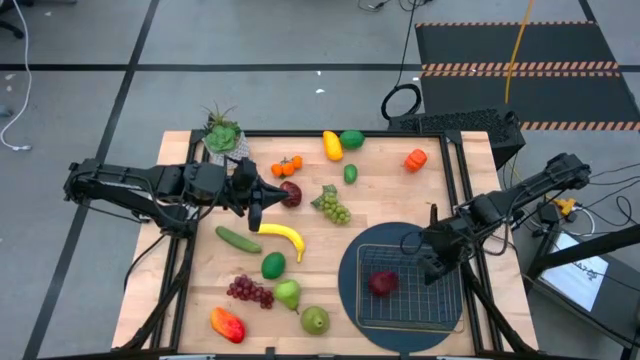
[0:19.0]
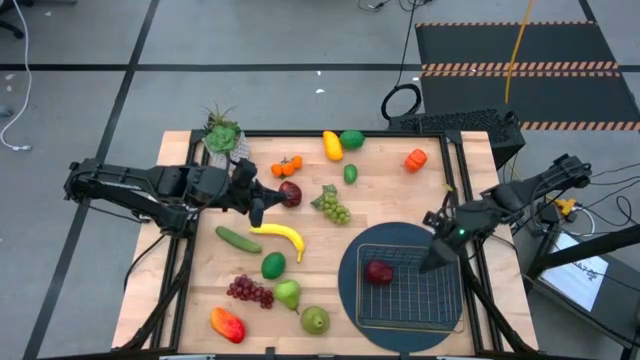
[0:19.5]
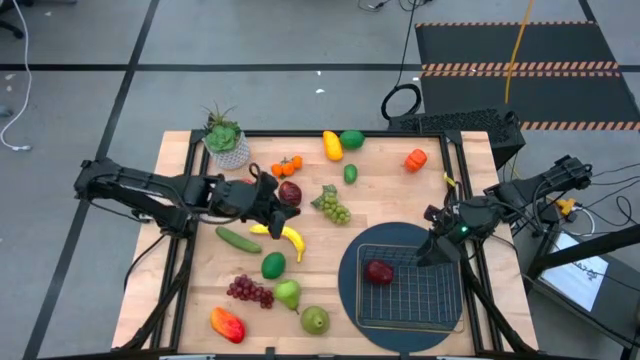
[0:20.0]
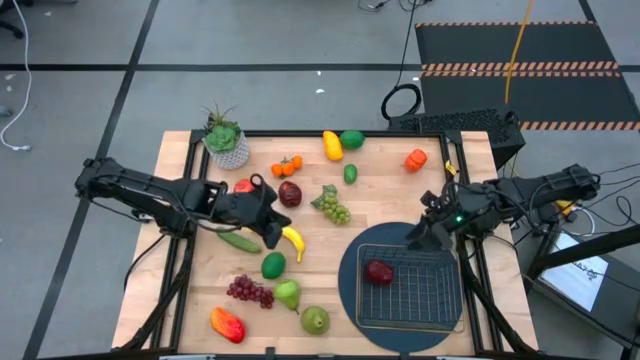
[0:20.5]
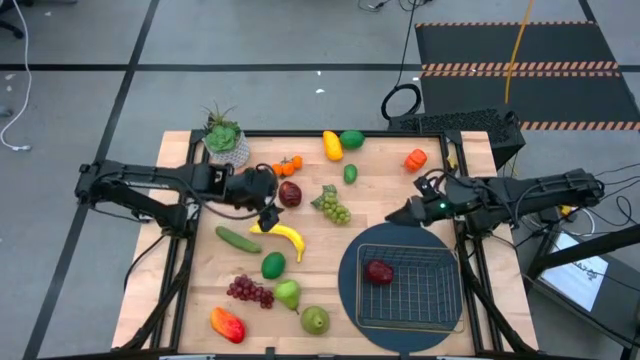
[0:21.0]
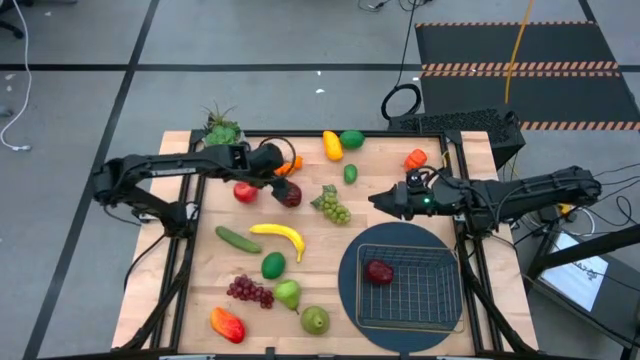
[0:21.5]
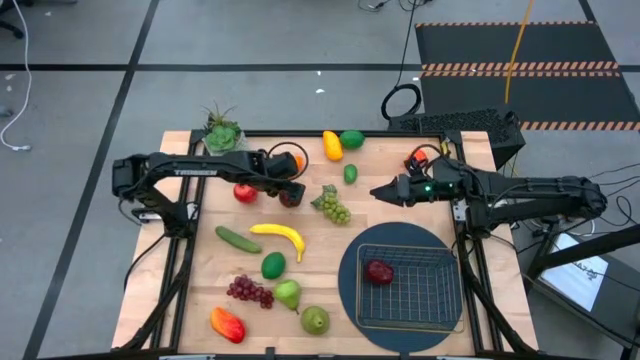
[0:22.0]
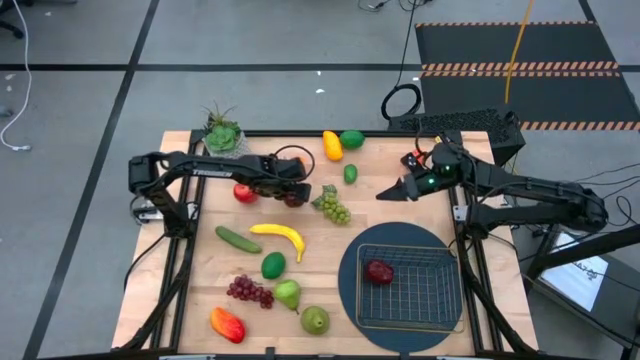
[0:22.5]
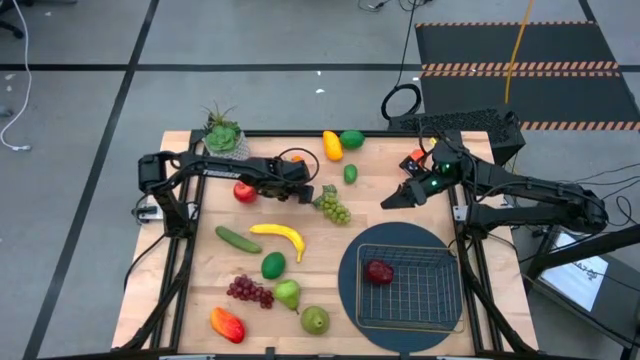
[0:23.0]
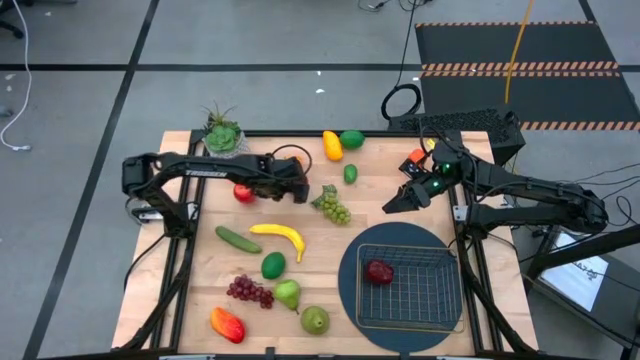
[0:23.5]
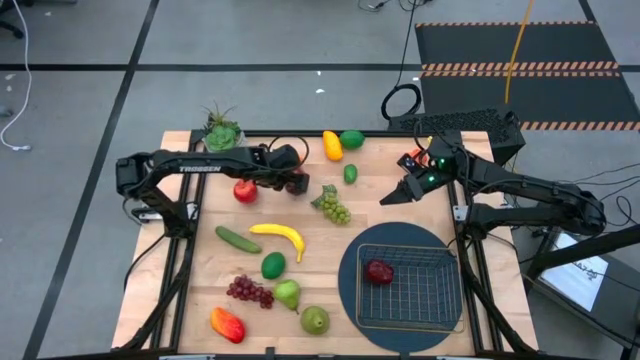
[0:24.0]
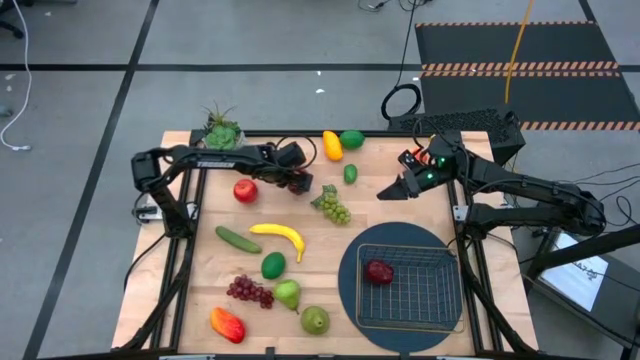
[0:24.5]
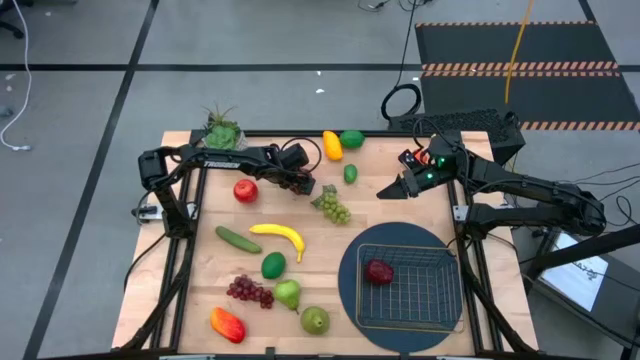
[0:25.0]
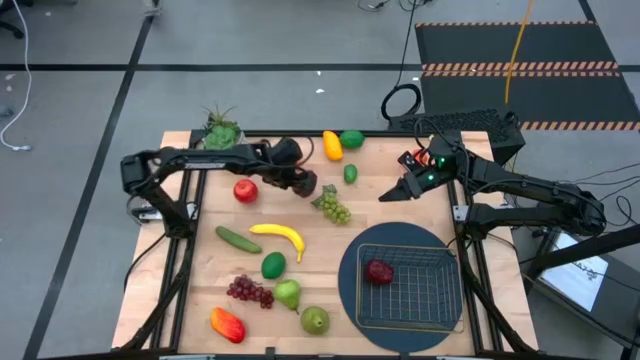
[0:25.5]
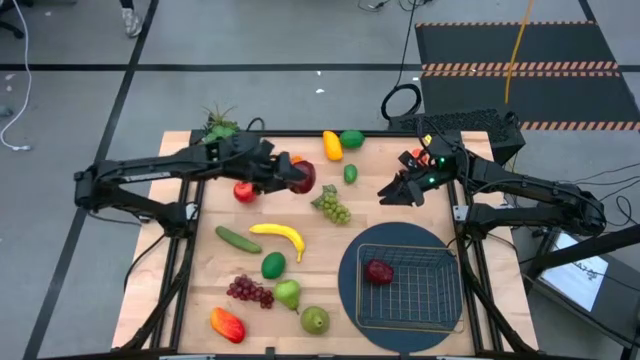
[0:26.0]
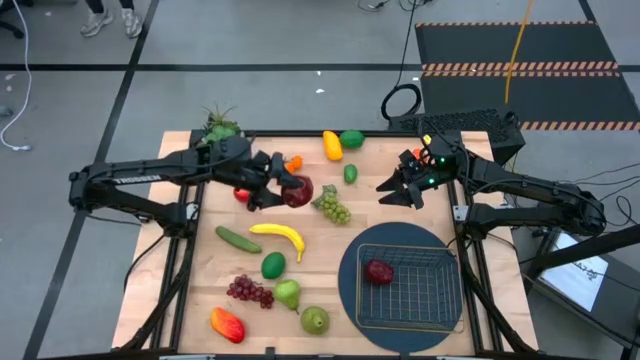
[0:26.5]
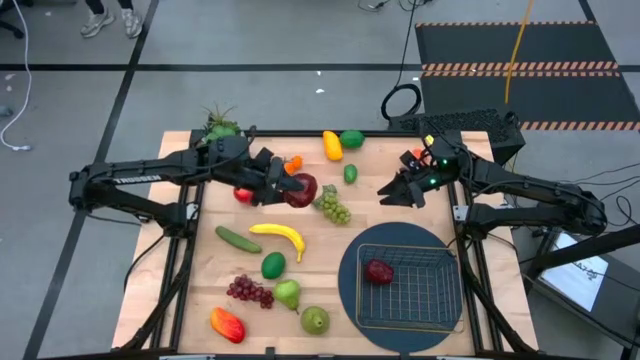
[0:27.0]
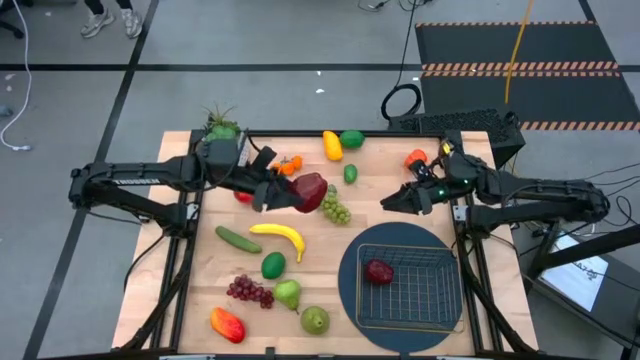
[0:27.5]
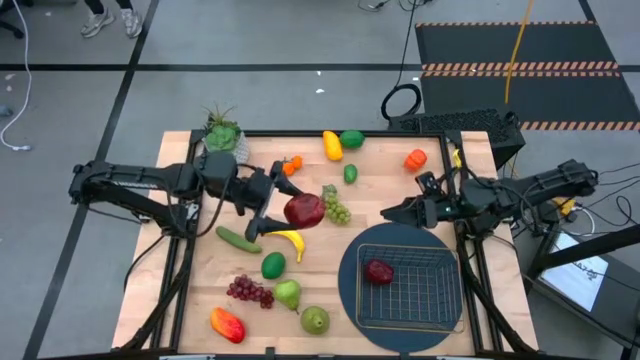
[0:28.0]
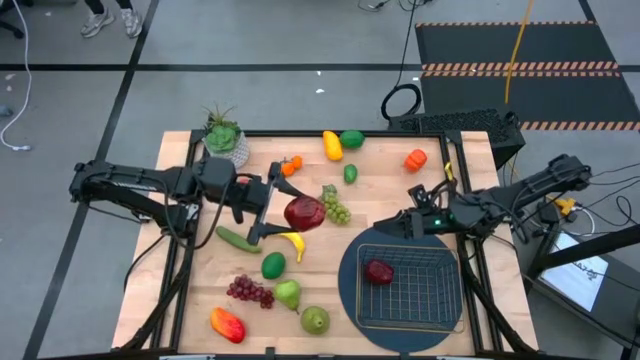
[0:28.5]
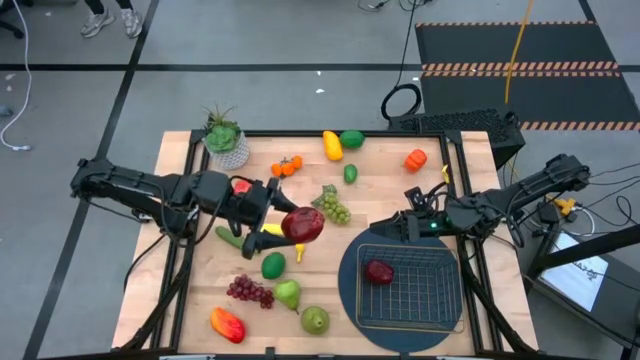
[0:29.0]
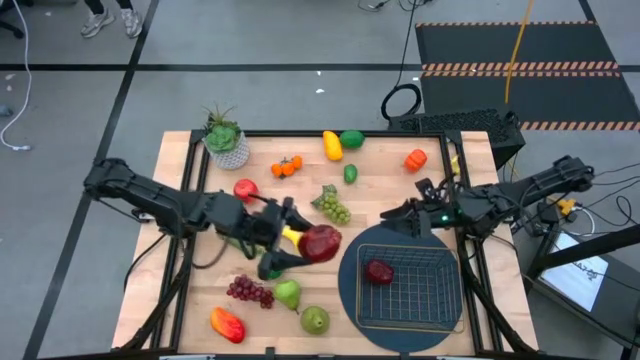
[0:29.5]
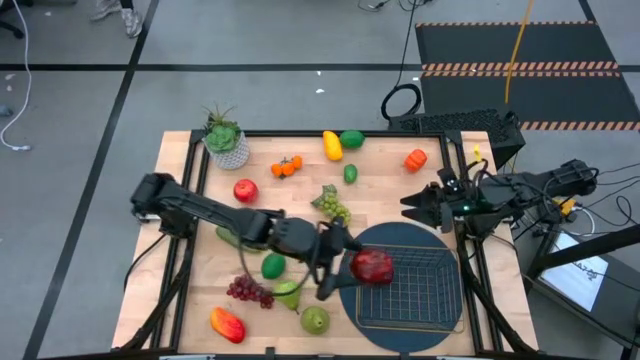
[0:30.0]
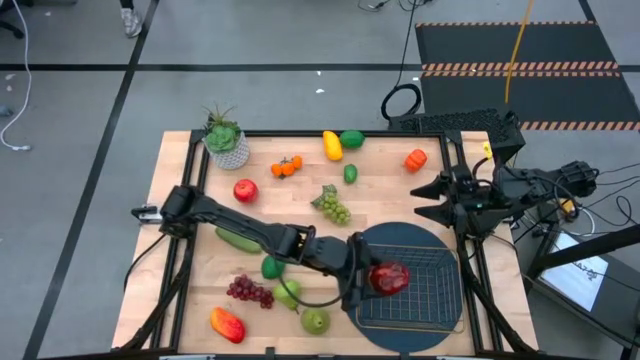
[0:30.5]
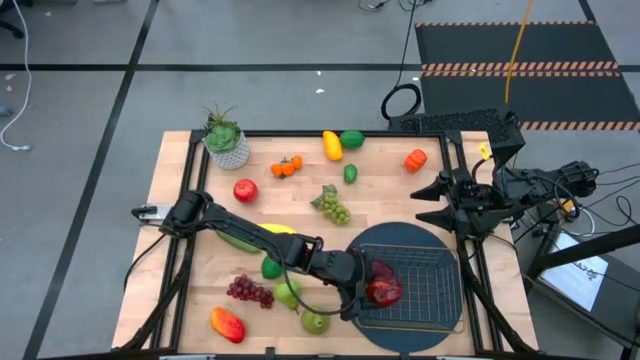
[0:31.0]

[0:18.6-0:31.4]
Task: Build produce basket
Put the right apple into the gold wire basket

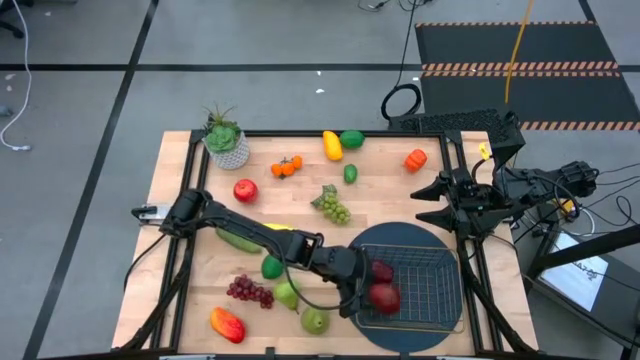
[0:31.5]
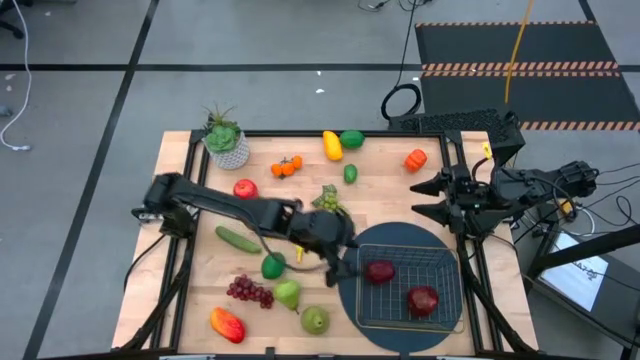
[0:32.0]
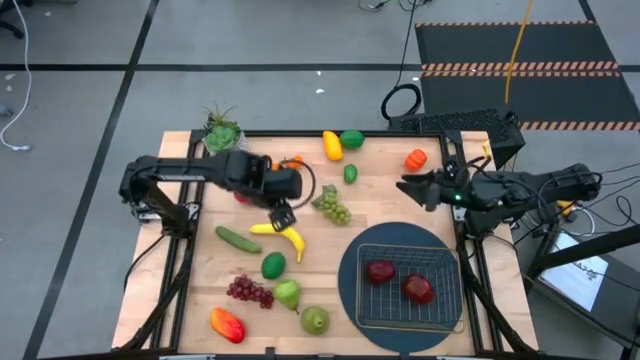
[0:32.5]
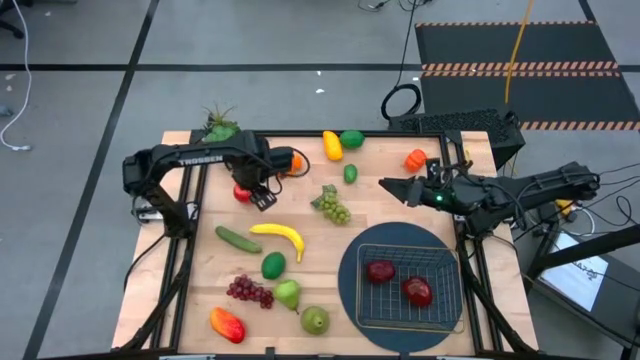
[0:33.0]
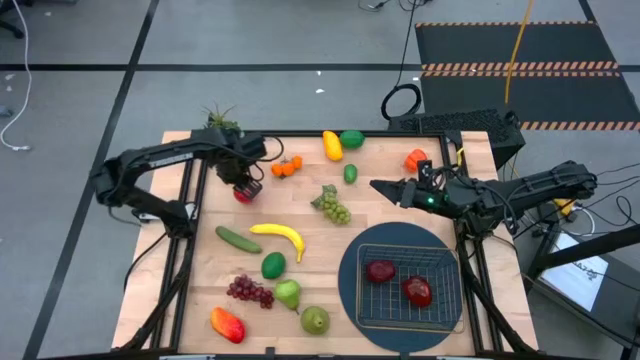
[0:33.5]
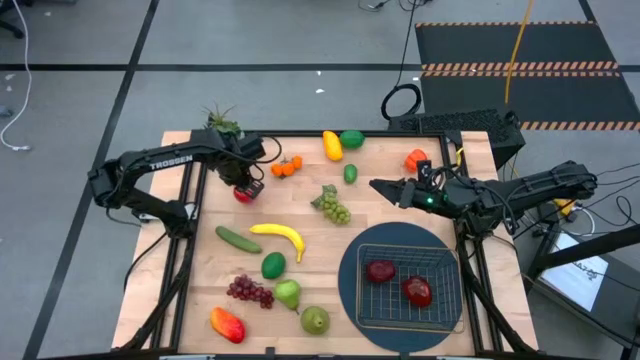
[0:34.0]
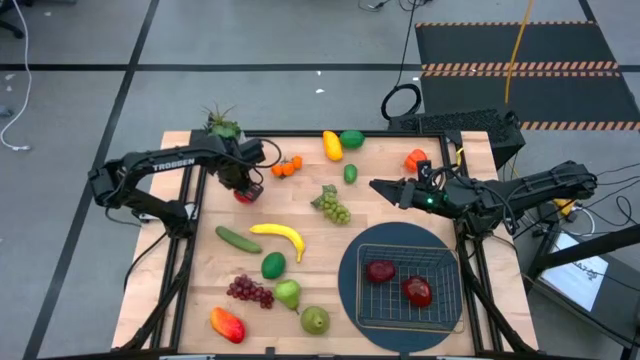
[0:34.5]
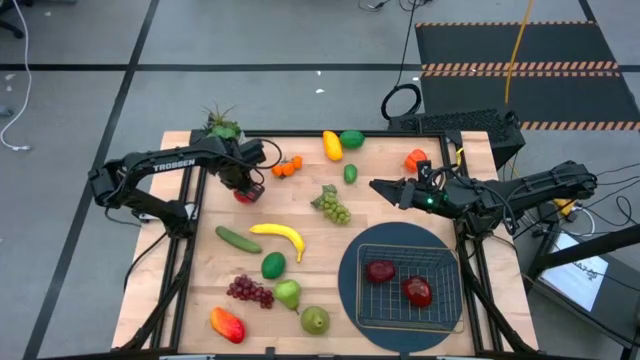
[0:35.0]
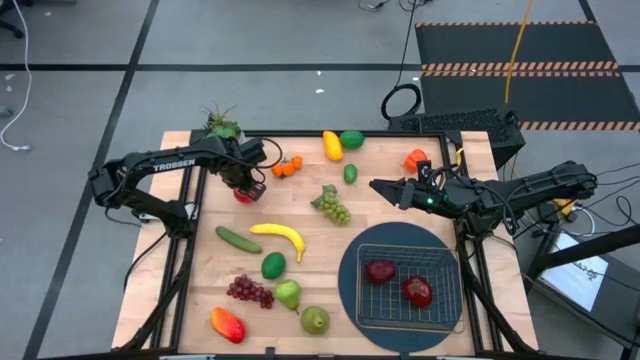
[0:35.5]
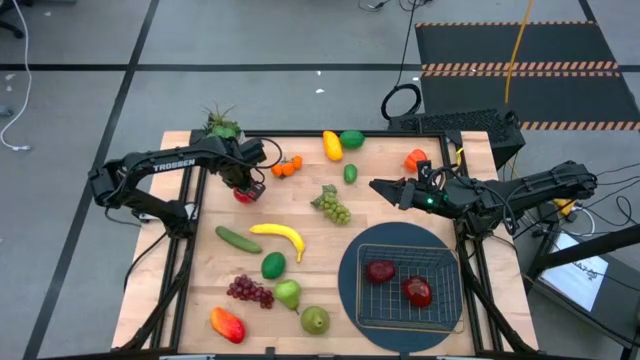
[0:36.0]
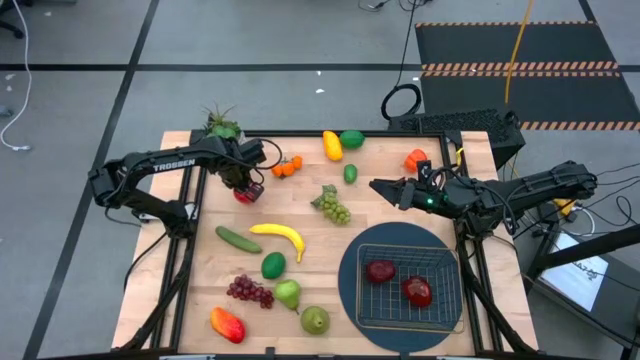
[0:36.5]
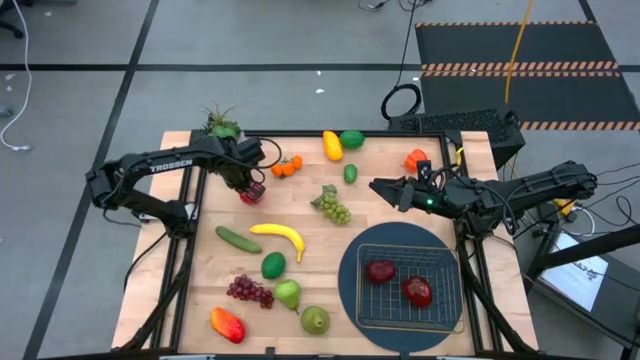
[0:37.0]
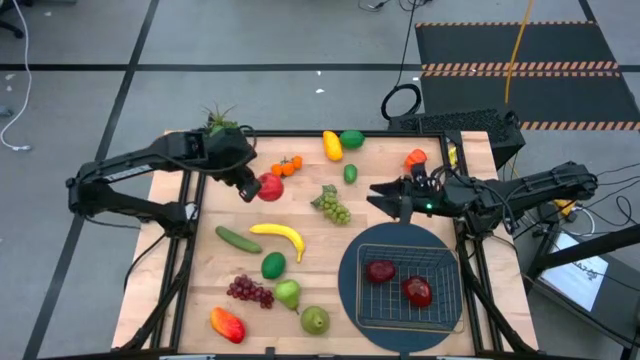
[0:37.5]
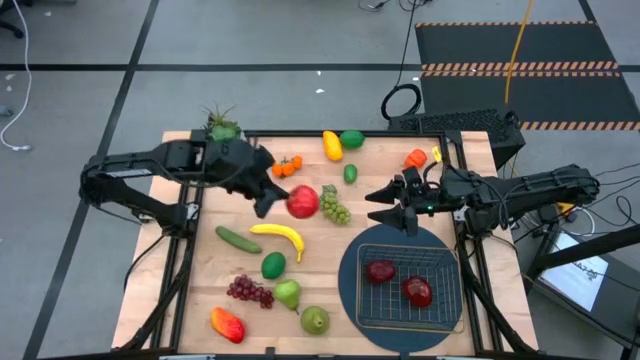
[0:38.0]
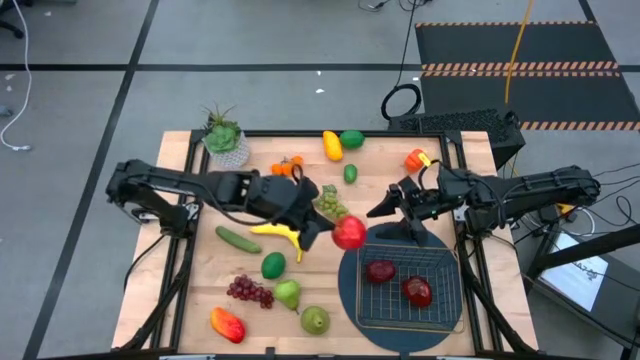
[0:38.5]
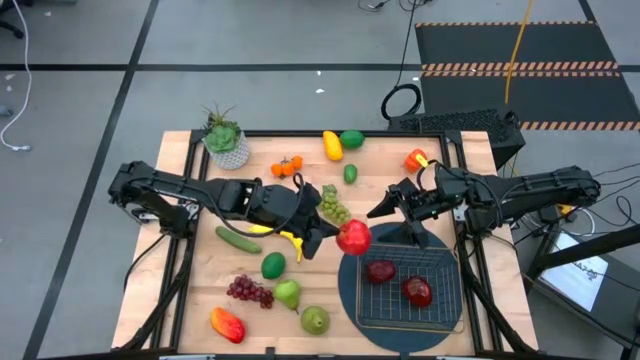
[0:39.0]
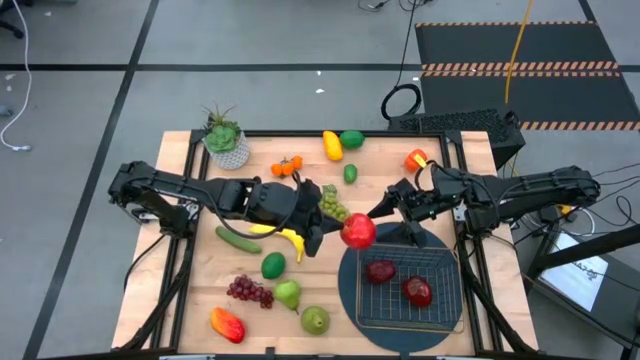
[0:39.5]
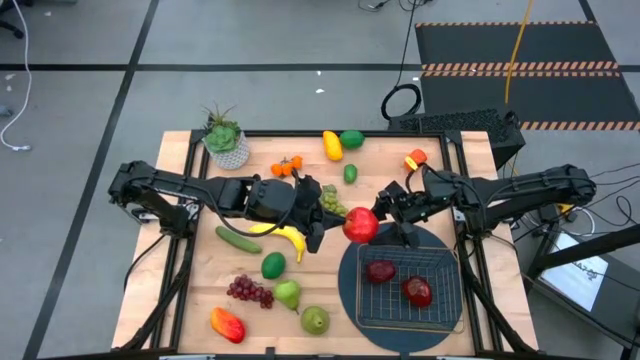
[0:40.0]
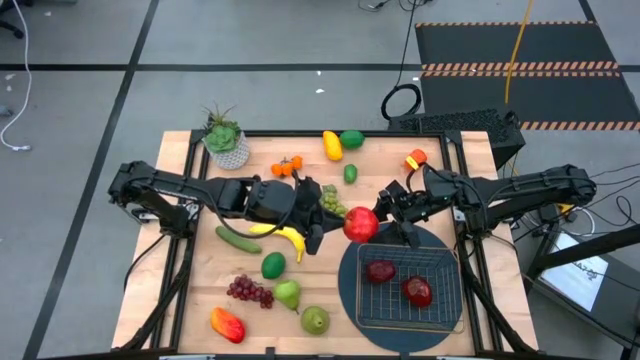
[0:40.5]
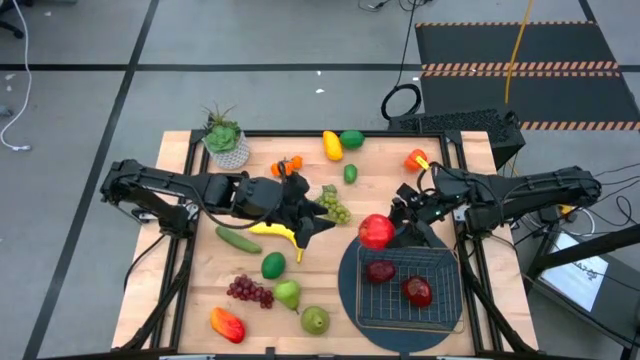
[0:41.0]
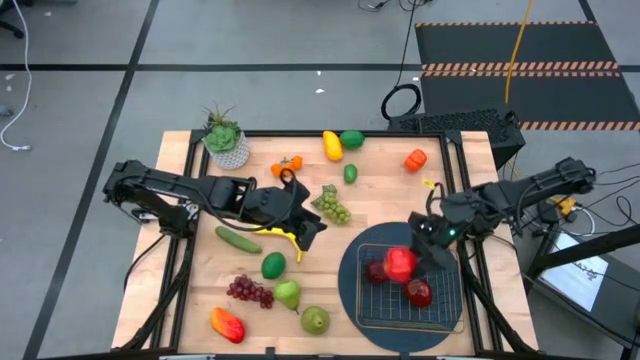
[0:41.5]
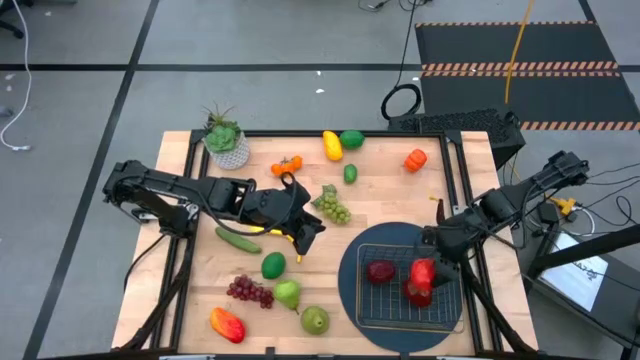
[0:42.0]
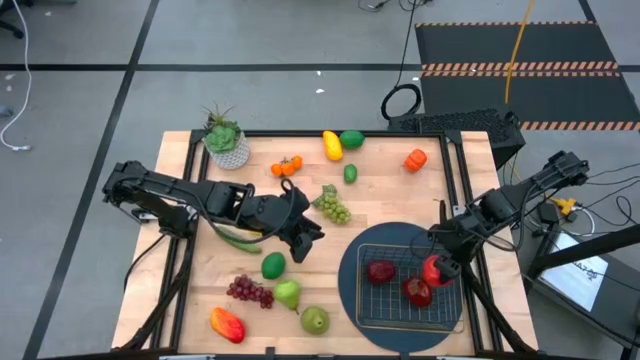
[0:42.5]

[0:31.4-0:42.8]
Put the apple into the gold wire basket
